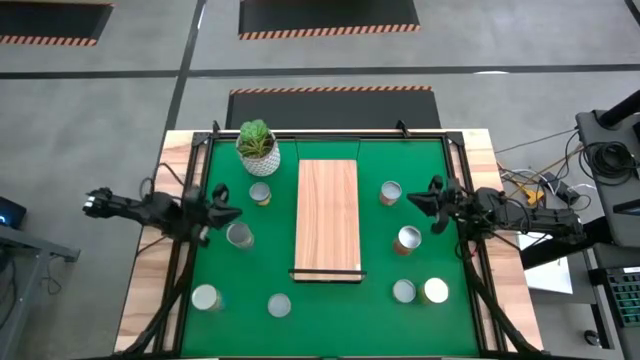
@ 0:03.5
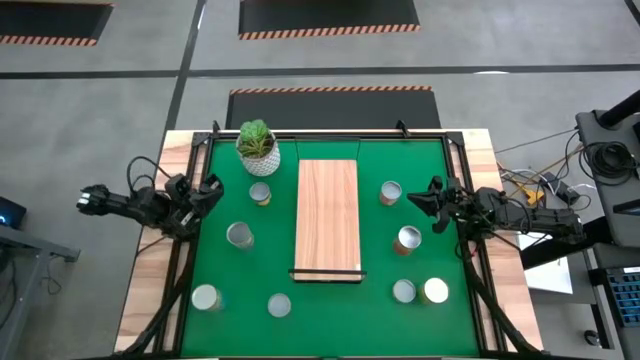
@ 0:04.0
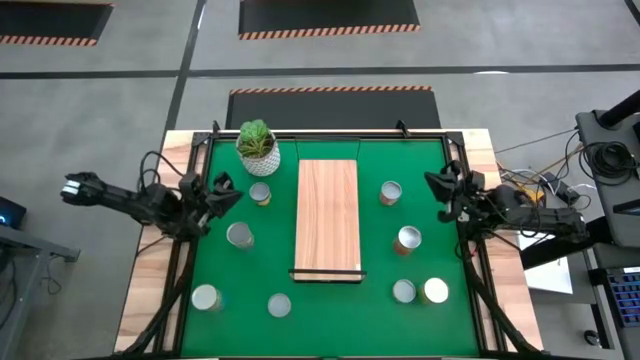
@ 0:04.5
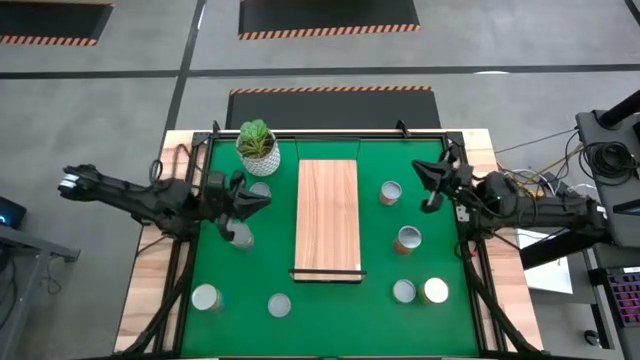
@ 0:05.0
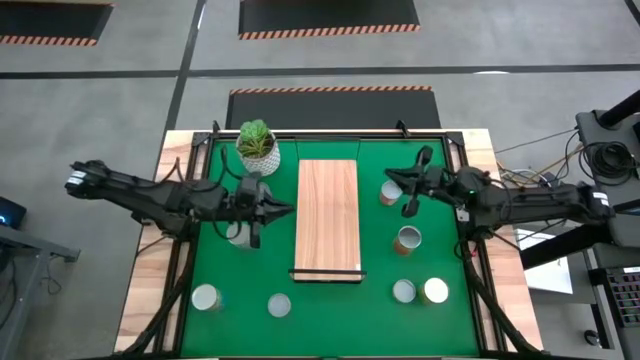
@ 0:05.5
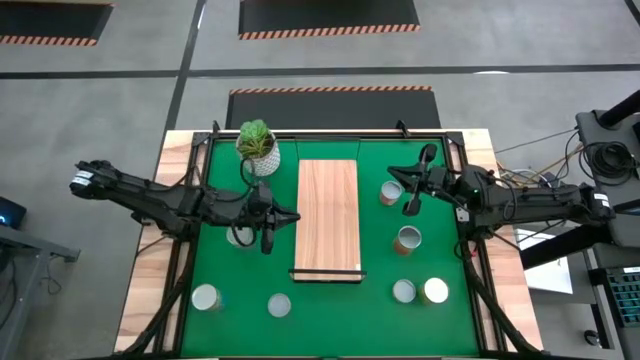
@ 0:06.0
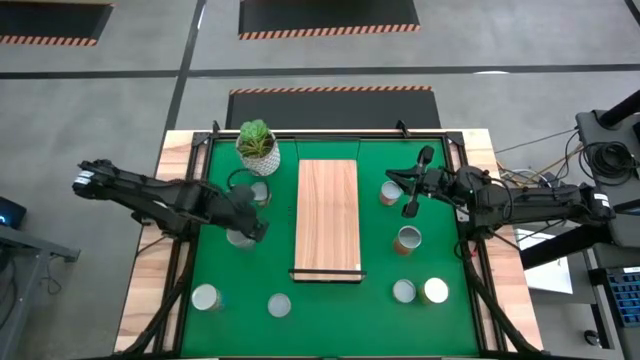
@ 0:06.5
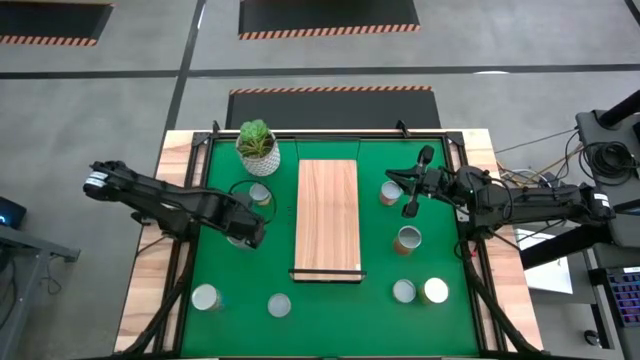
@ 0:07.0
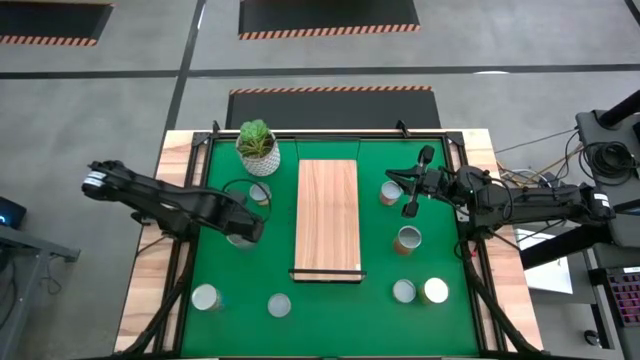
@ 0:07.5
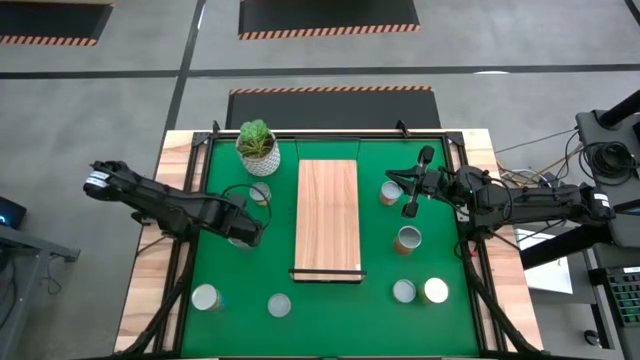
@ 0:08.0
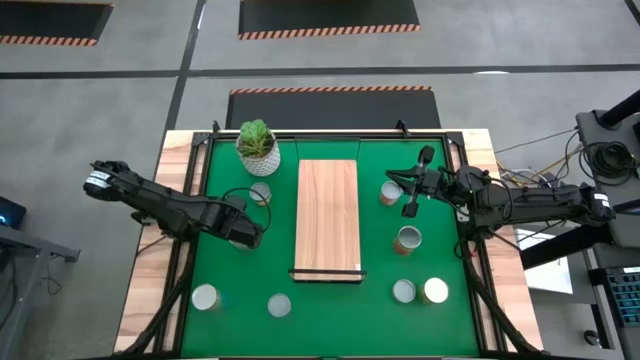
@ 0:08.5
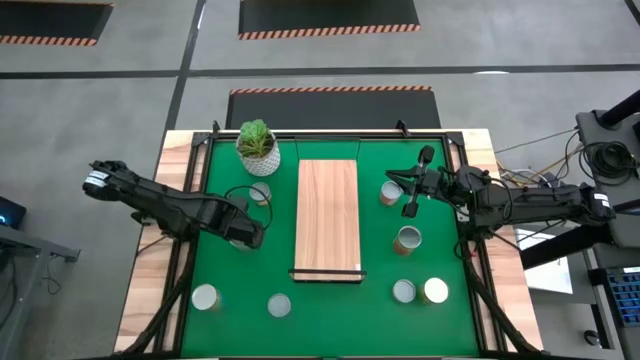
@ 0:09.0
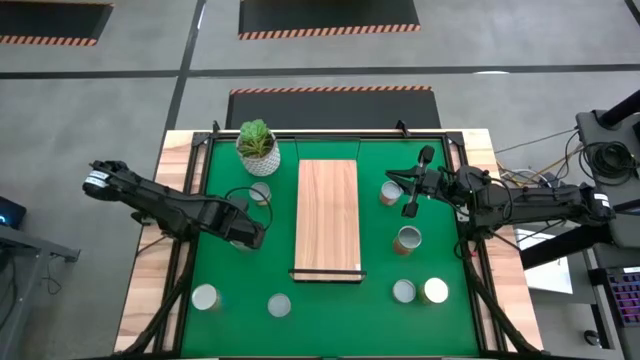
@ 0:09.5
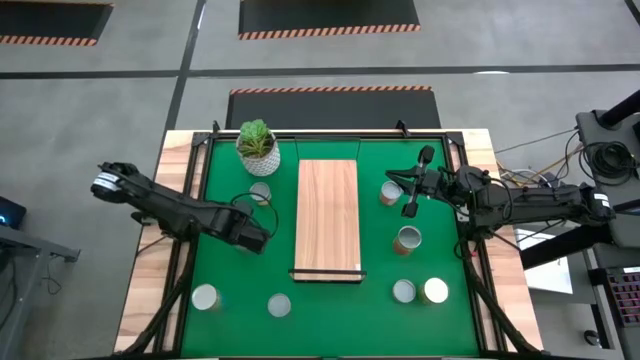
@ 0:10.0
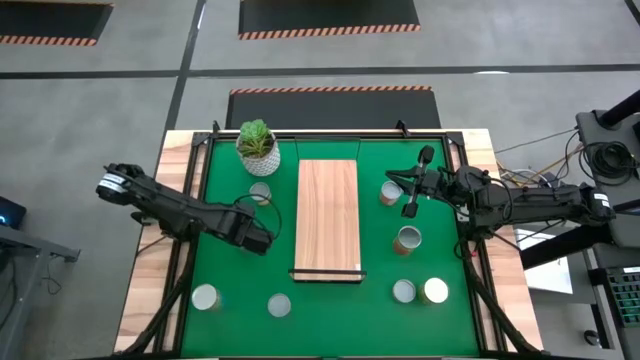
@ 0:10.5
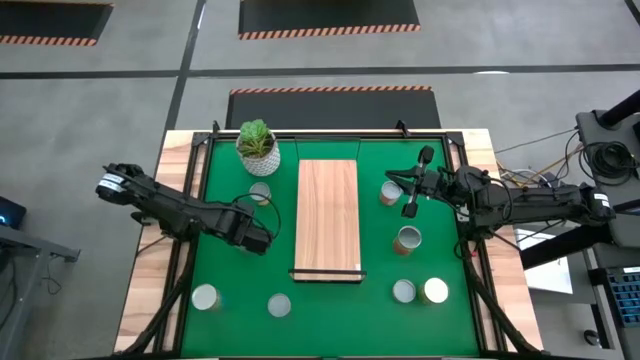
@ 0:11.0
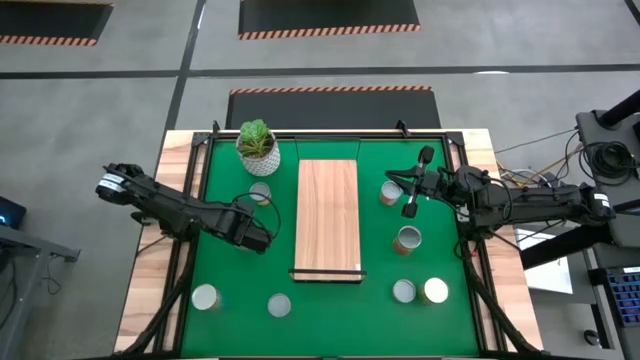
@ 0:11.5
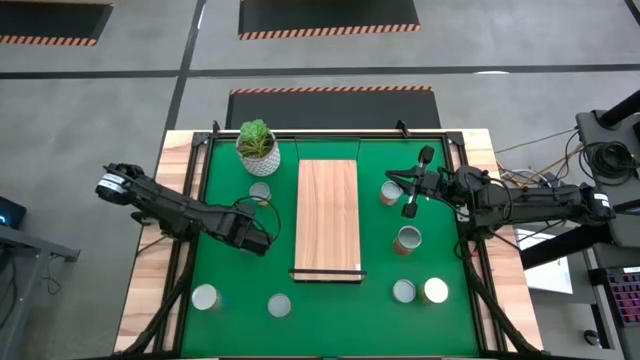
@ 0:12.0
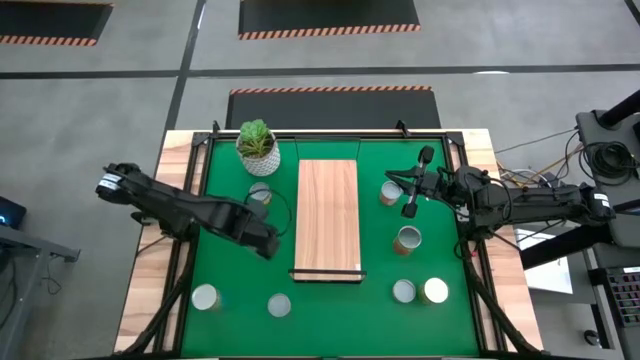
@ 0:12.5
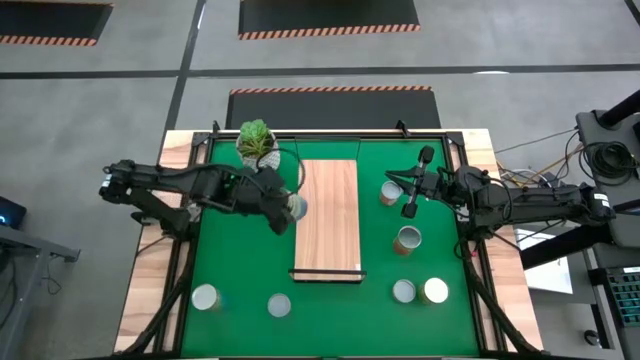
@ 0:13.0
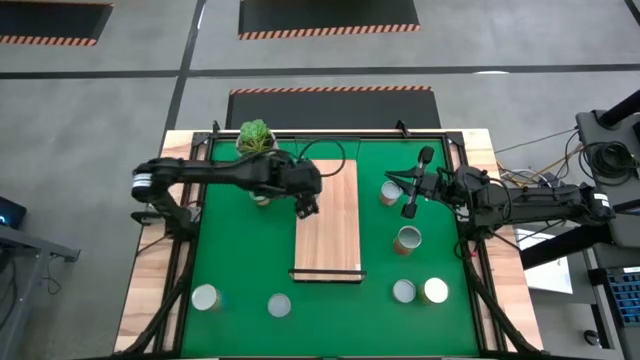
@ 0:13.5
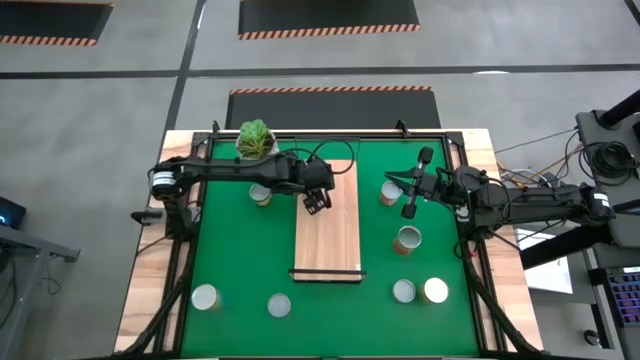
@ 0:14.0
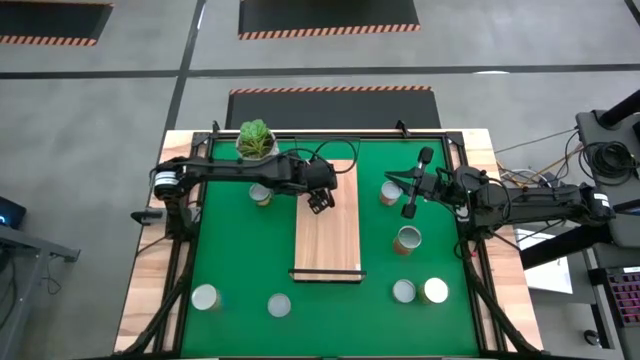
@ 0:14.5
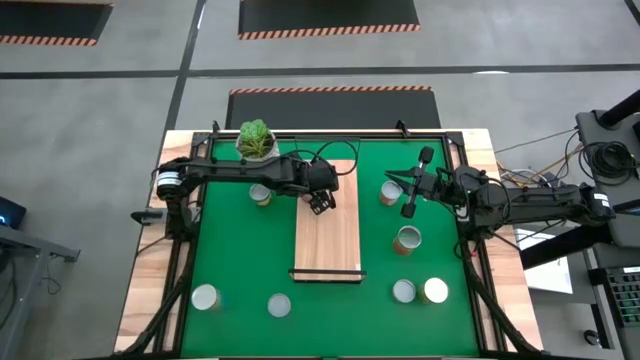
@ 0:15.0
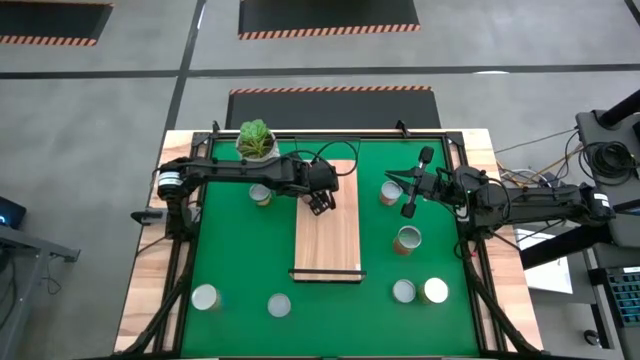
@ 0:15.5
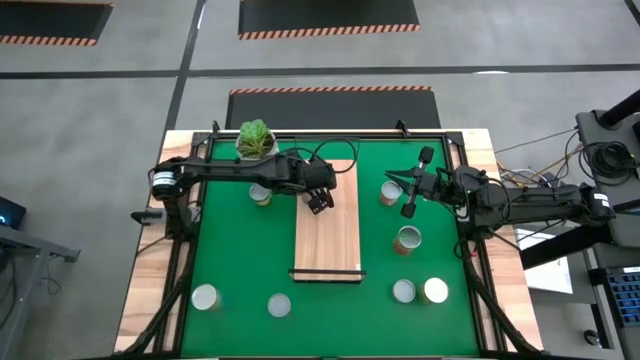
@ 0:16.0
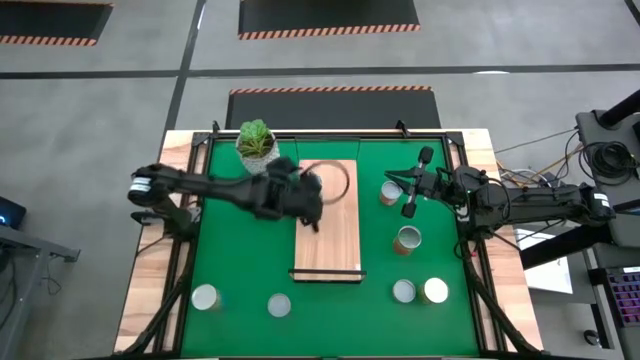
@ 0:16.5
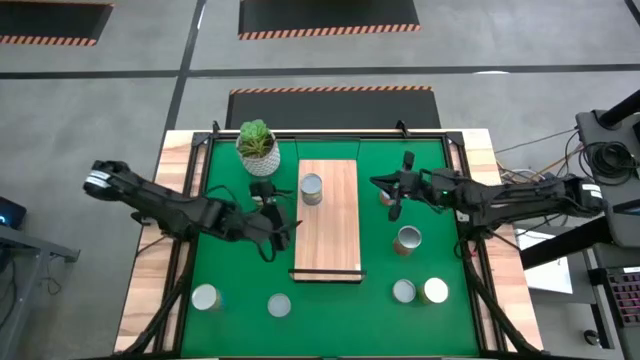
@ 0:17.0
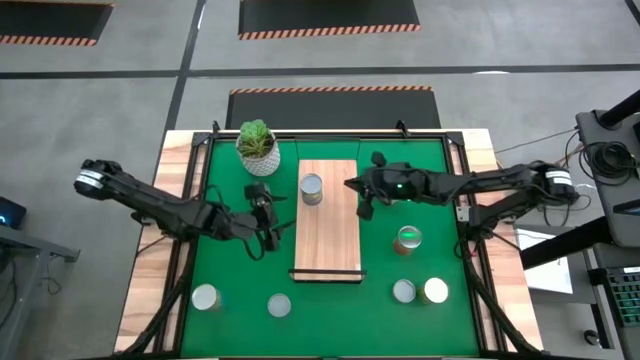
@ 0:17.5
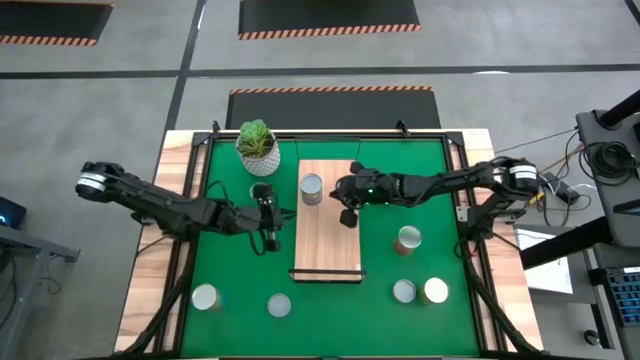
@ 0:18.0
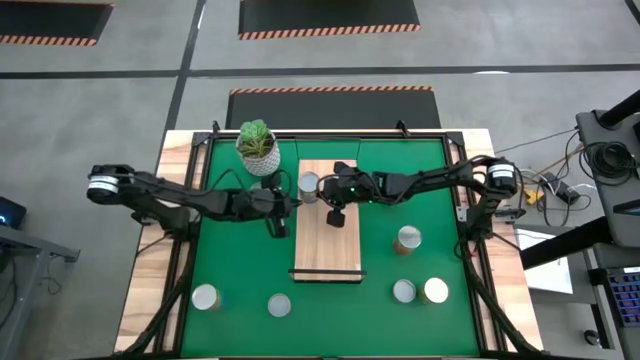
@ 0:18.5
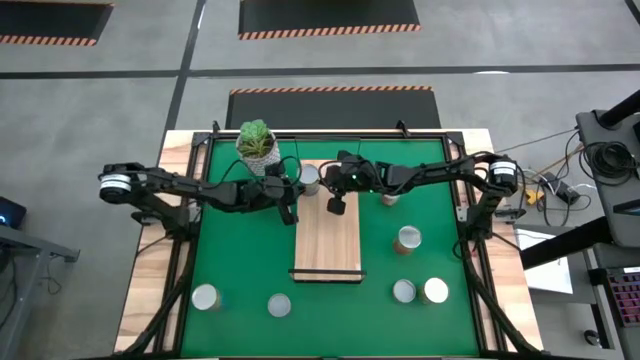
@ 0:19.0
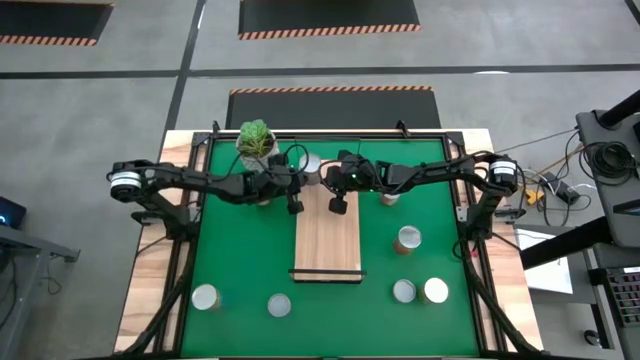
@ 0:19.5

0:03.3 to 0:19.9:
Task: Pick and place cans onto a shelf
Put the canned peas on the shelf

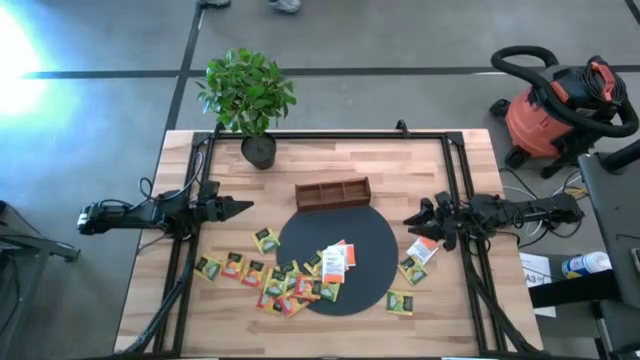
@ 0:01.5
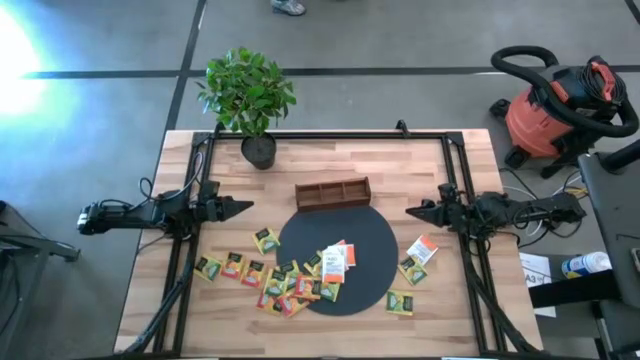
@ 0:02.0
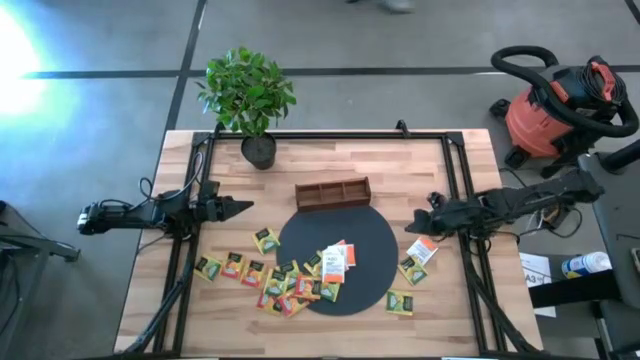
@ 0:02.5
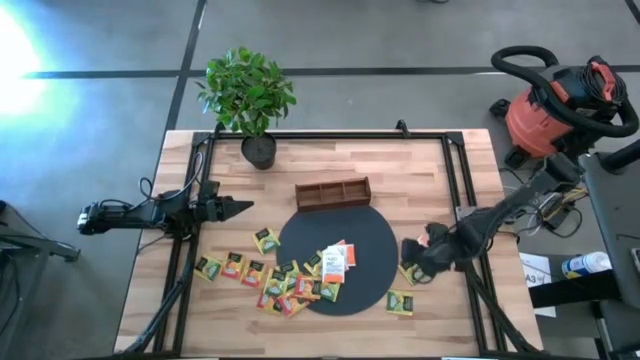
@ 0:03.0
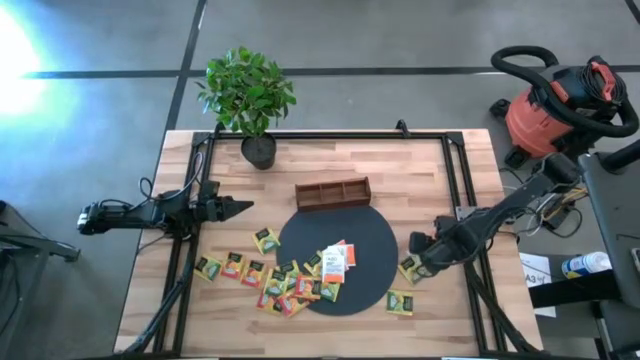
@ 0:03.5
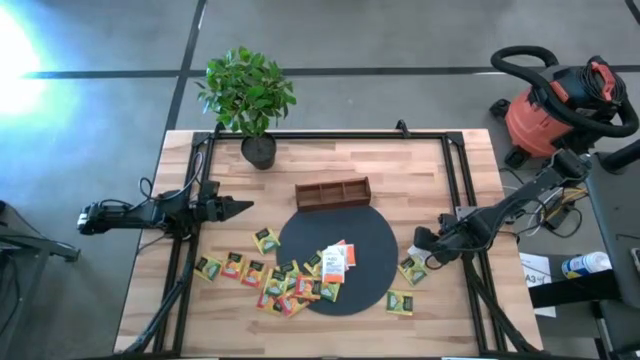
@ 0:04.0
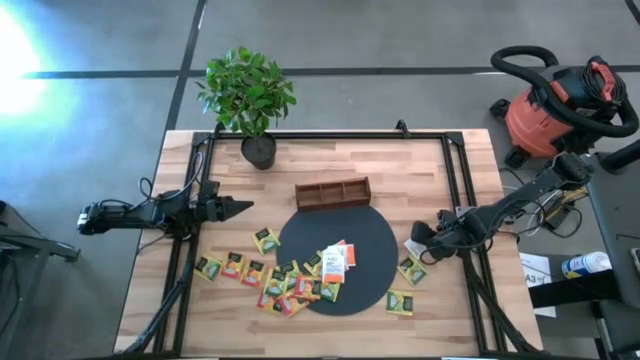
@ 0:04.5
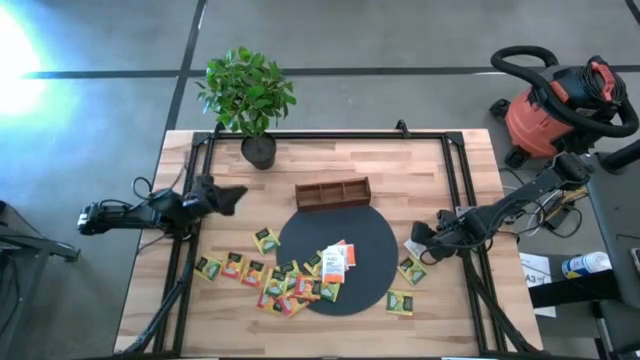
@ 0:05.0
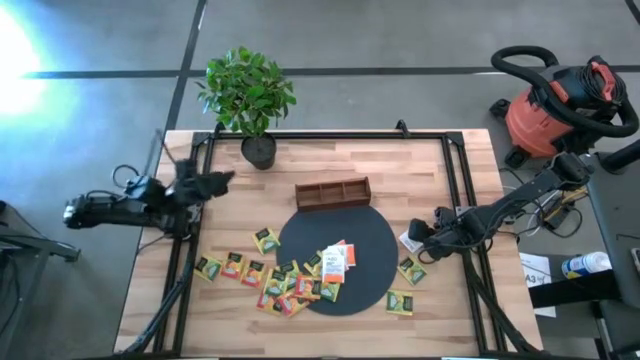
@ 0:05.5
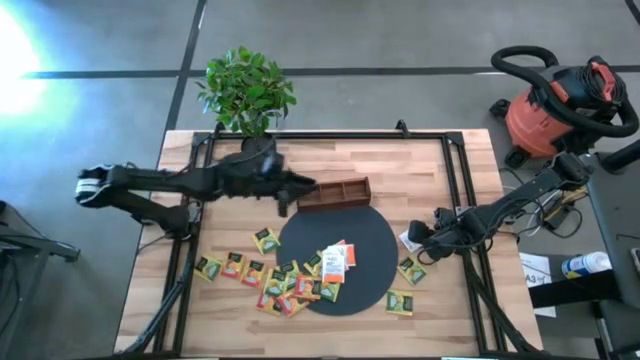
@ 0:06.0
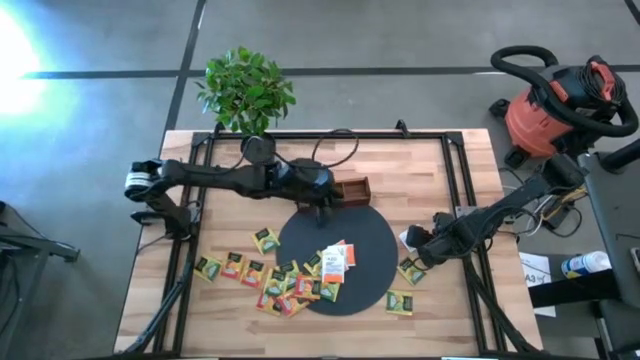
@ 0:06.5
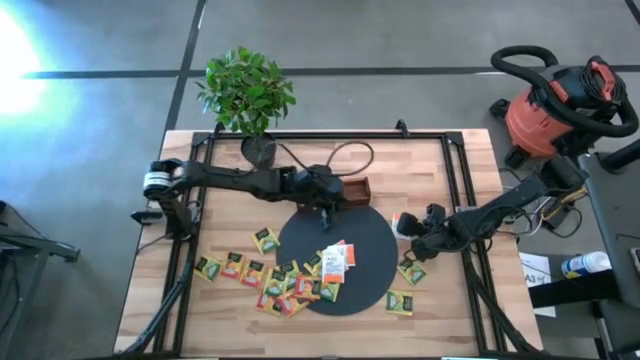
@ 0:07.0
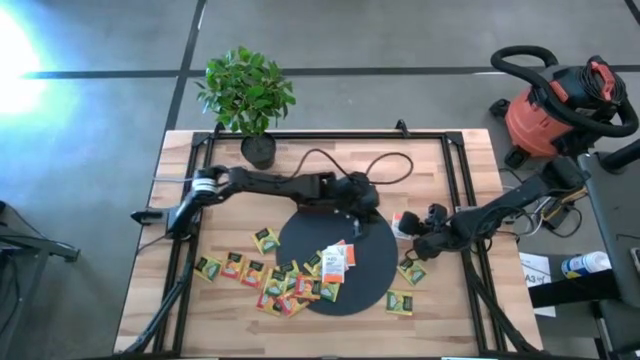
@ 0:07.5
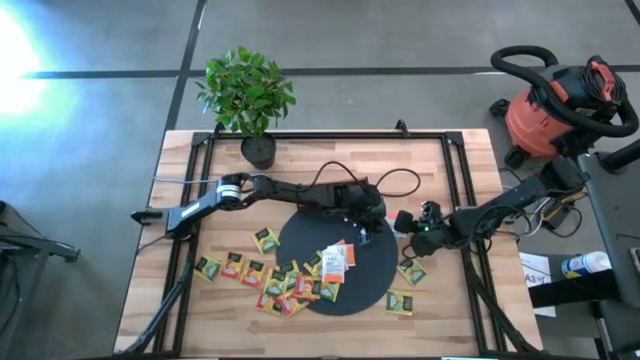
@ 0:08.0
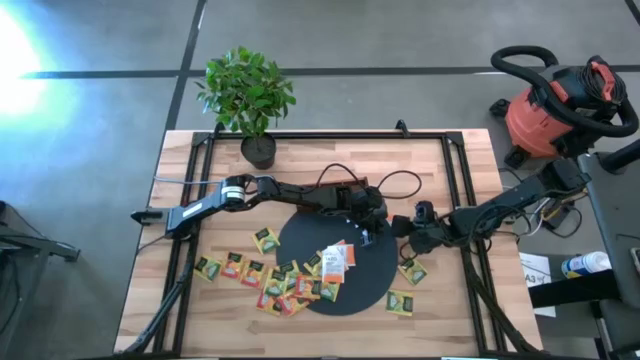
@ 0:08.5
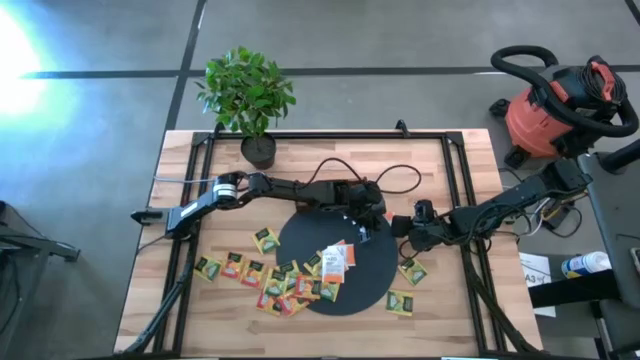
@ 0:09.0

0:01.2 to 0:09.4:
Task: Pick & Place Tea
Put the white tea bag into the right slot of the wooden organizer
